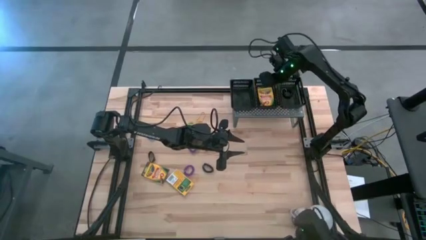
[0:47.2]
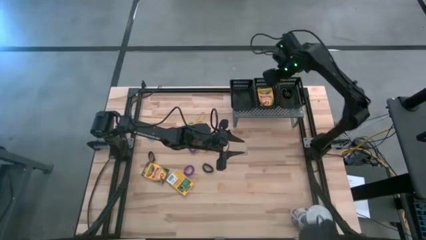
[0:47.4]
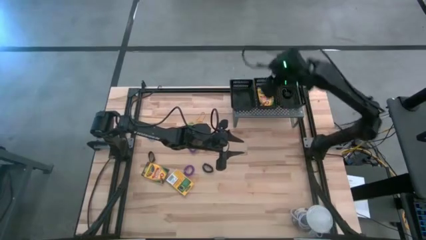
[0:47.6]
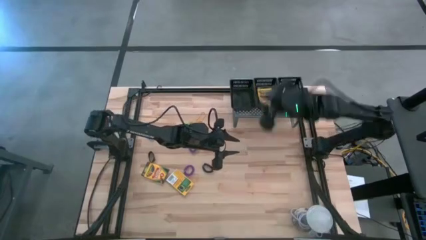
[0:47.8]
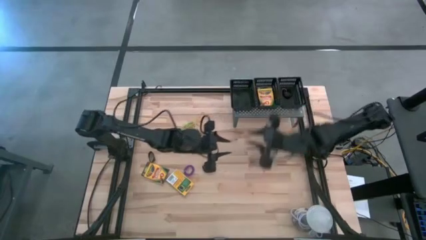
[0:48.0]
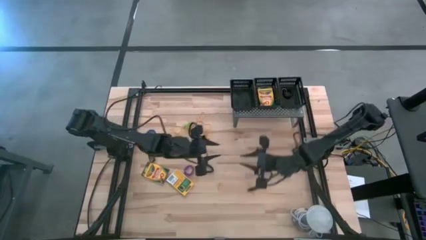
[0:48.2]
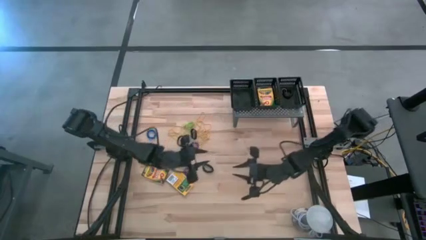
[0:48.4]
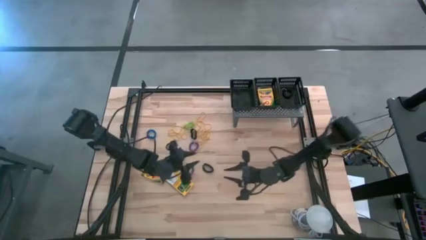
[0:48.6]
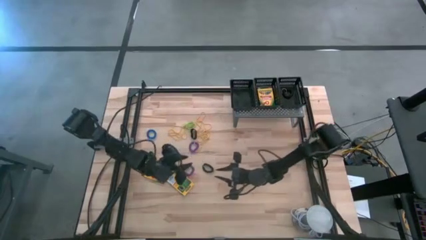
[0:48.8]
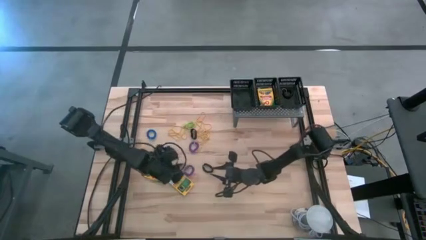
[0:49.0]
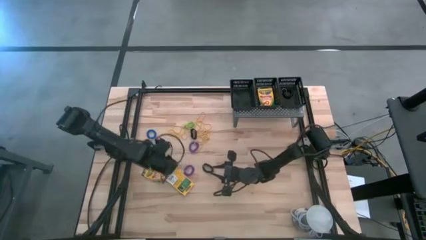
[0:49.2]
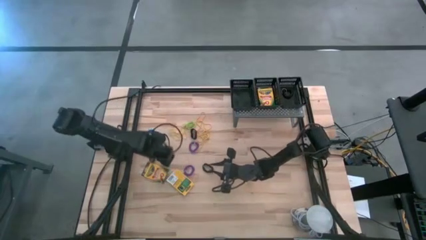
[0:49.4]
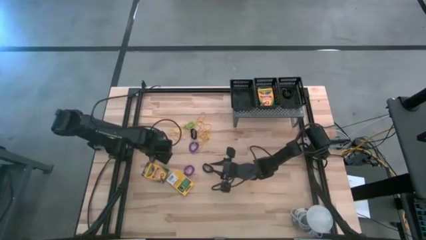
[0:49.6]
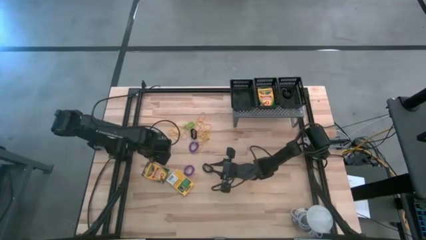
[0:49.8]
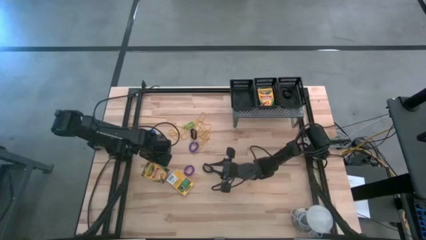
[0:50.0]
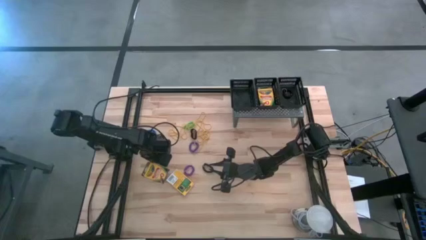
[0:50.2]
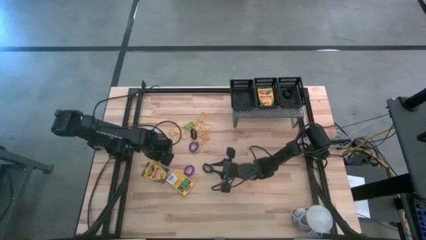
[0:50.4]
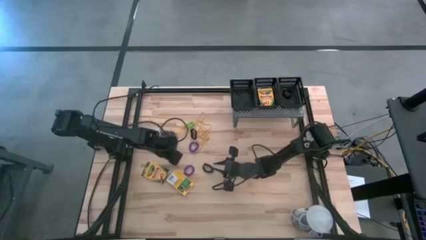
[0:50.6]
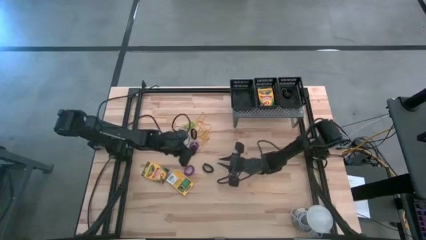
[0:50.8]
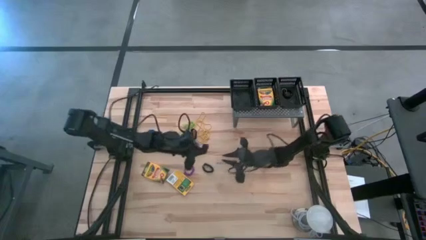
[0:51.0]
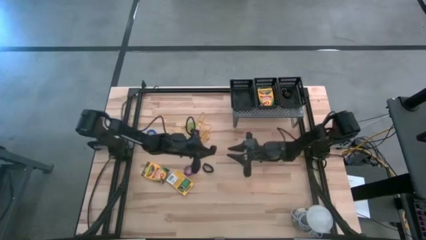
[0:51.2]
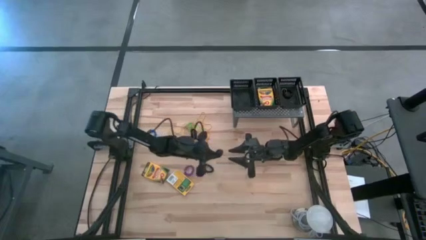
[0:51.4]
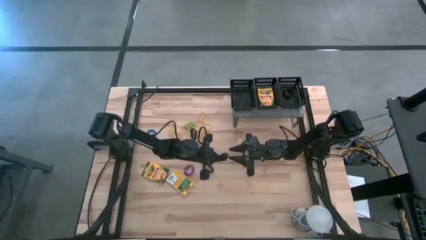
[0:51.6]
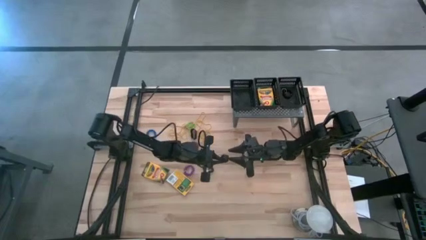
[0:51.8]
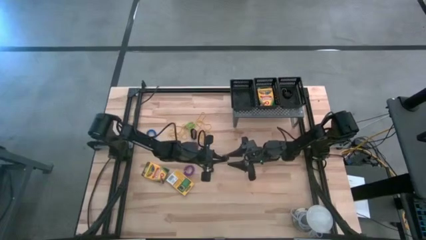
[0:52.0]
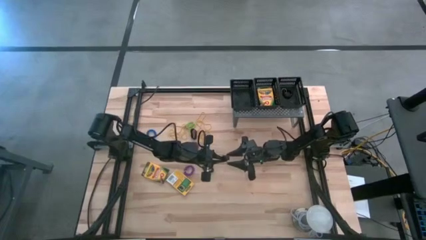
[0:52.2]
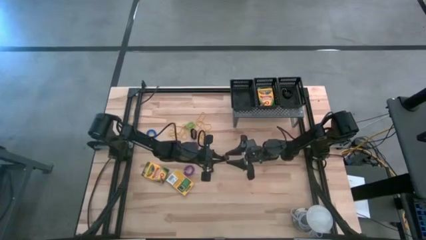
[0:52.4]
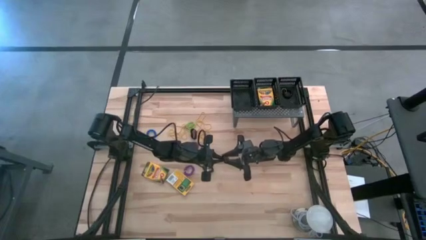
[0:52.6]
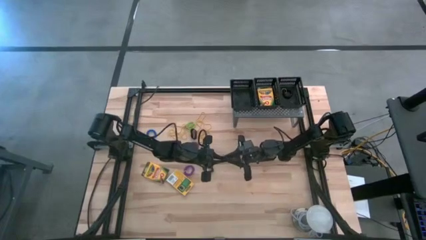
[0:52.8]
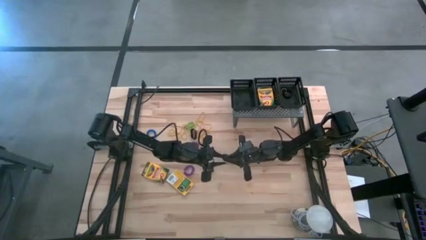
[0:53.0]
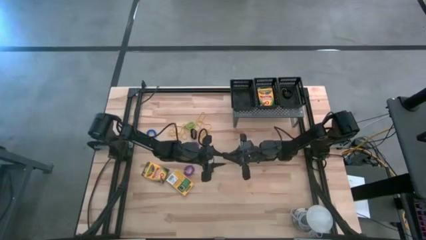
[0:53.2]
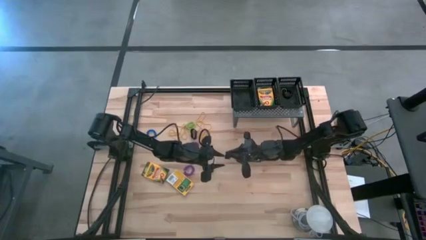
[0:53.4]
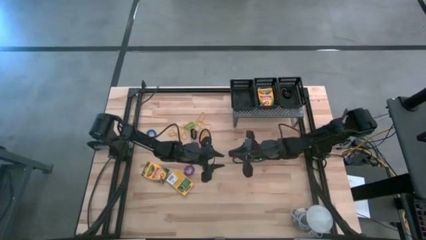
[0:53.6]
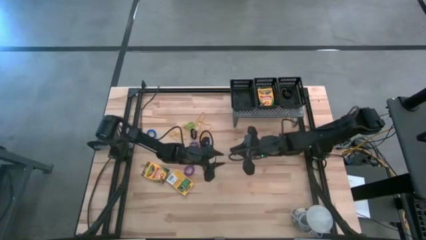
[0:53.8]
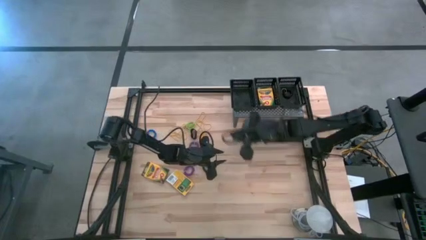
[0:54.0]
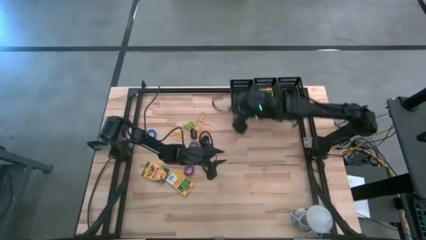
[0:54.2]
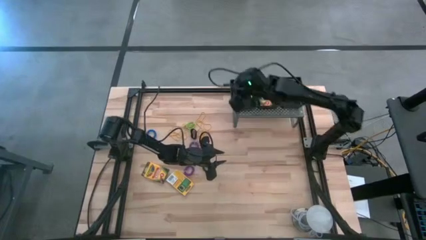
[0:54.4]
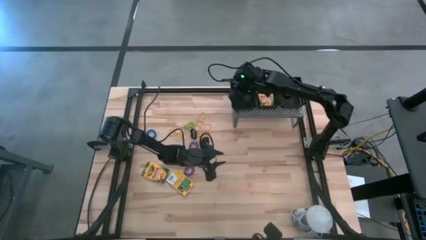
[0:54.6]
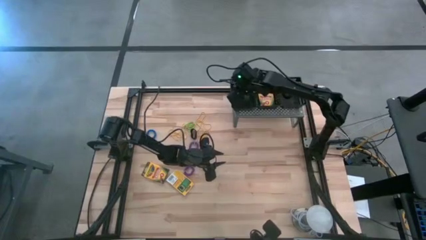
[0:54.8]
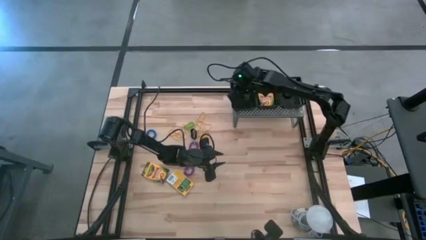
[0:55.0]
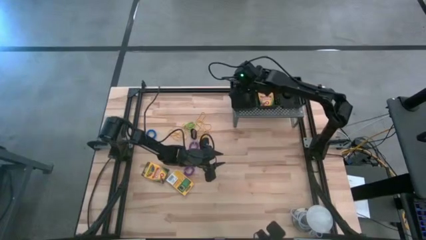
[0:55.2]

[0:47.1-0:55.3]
Task: Pick & Place Office Desk Supplies
Put the black rubber band into the left black basket on the shelf

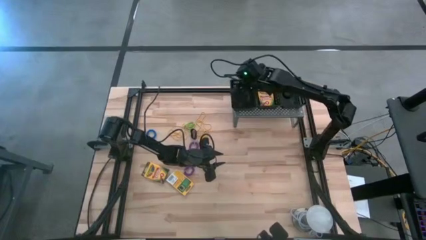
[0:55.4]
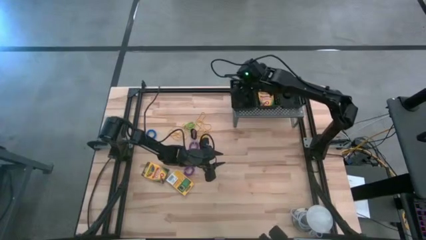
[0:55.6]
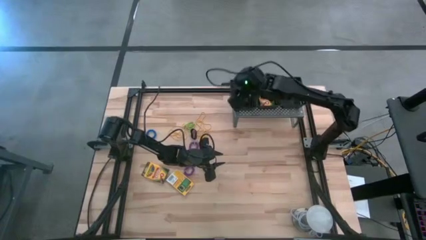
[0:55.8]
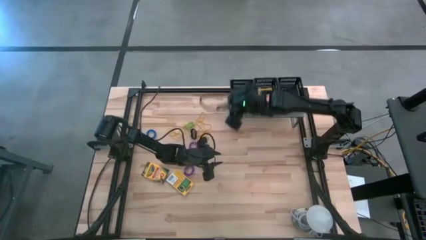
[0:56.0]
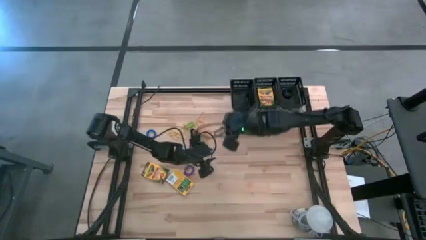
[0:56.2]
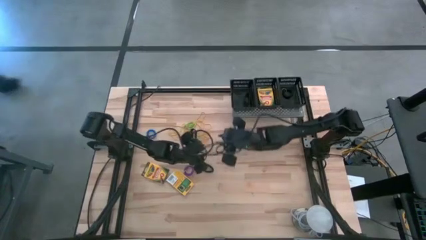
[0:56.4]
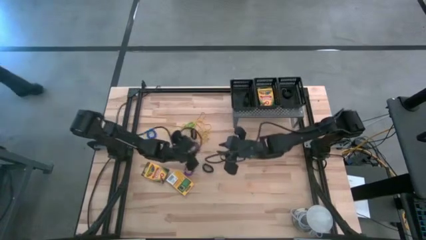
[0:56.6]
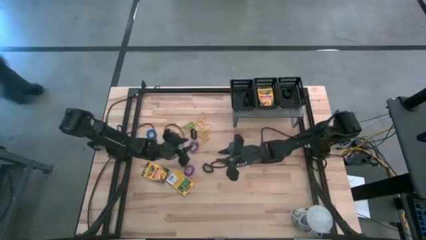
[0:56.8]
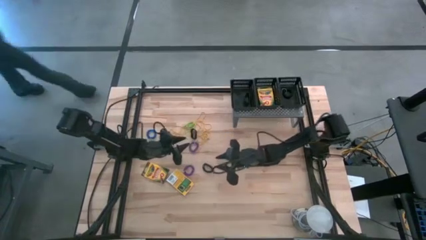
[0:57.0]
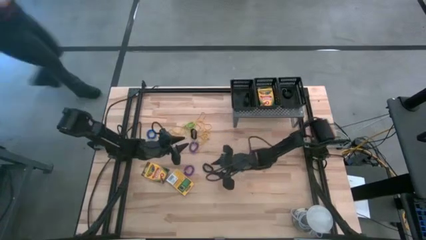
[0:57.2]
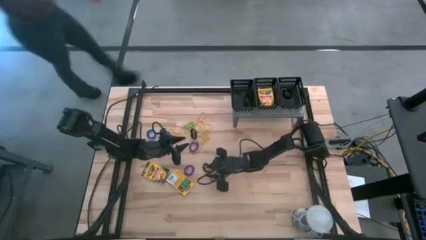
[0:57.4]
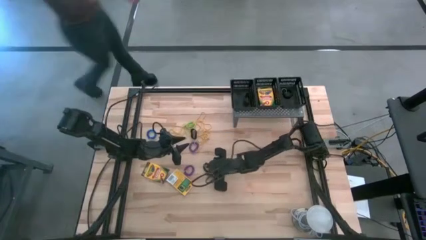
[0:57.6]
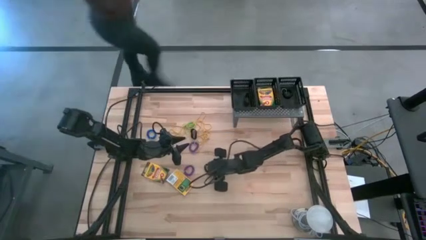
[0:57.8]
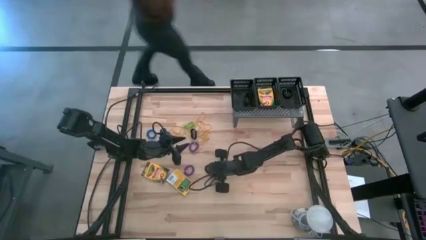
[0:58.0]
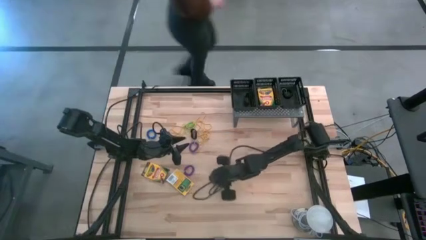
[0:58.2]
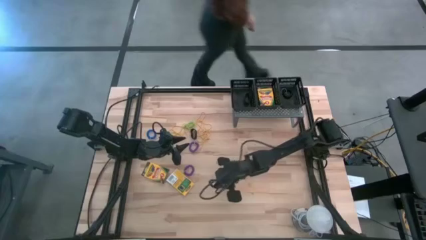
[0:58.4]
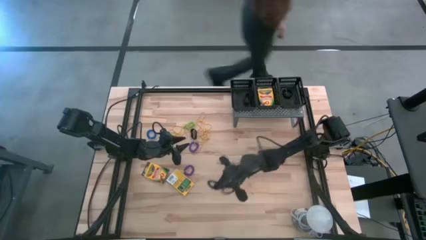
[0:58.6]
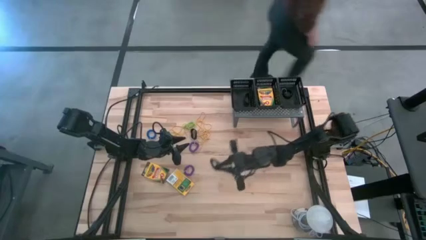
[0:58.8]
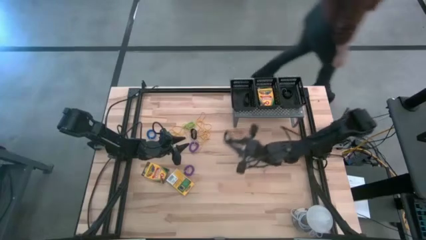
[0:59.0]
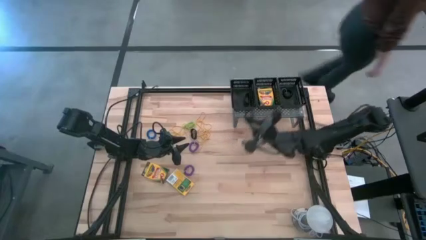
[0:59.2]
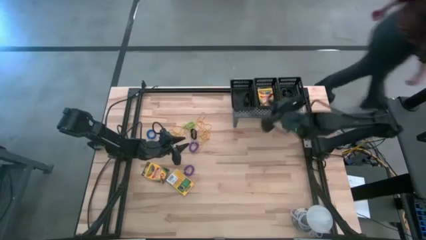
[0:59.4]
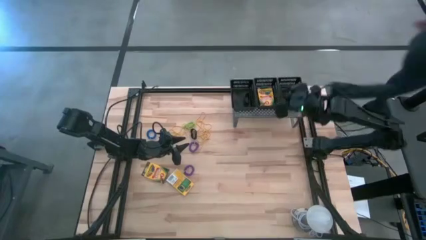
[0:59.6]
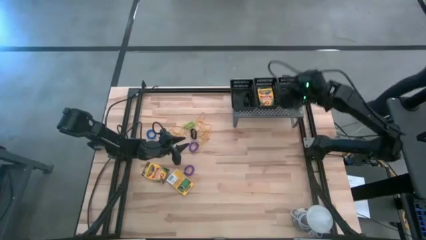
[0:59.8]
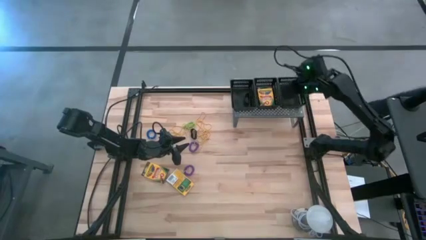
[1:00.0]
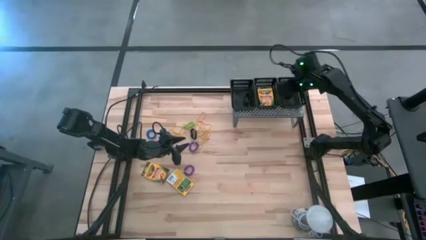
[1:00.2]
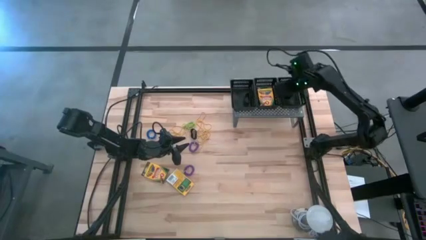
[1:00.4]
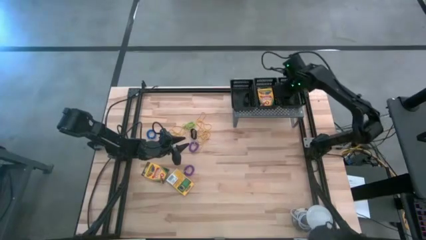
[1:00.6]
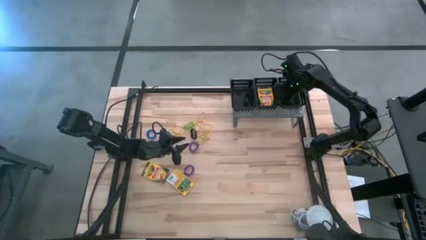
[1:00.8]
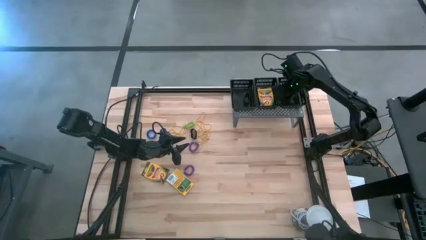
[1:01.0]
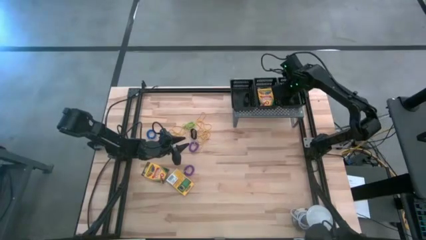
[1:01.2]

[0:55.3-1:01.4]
Put the black spring keychain into the right black basket on the shelf
